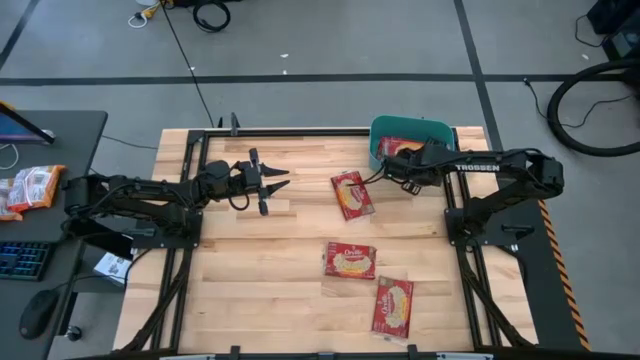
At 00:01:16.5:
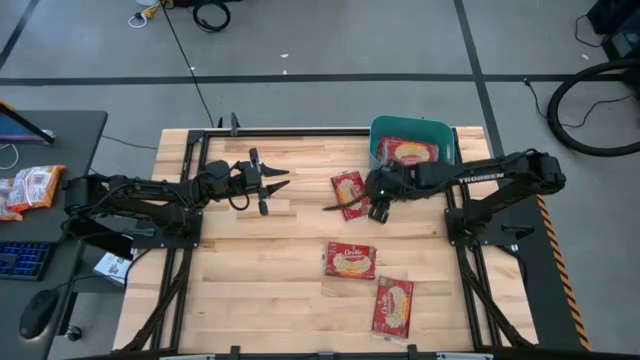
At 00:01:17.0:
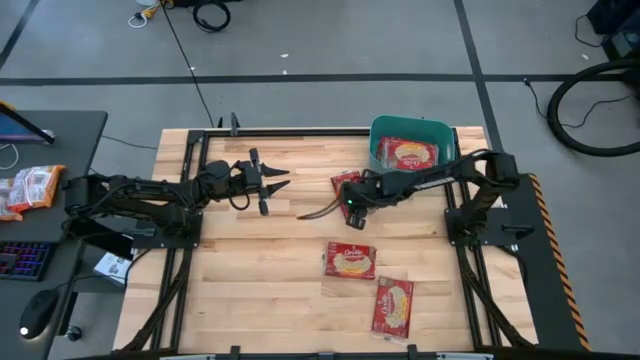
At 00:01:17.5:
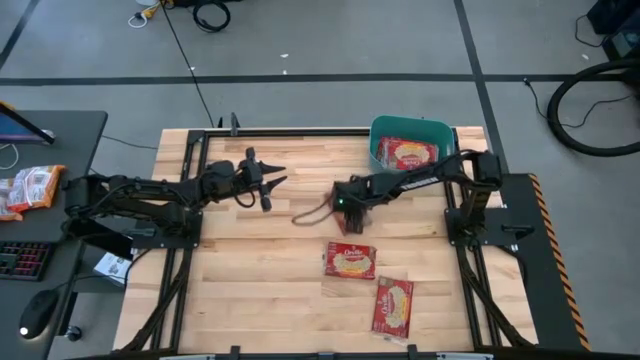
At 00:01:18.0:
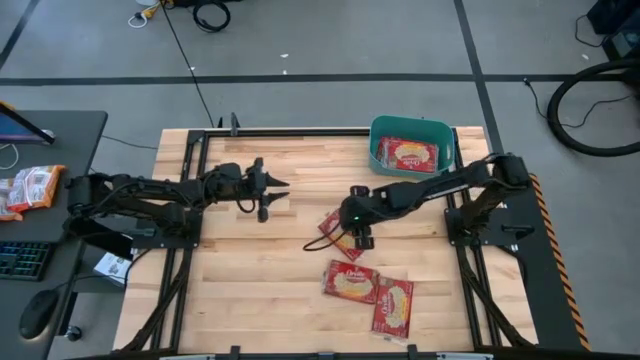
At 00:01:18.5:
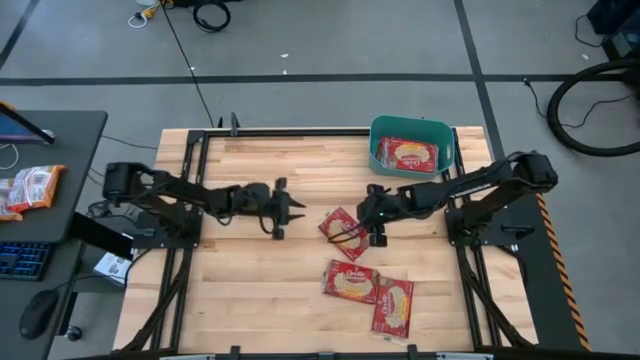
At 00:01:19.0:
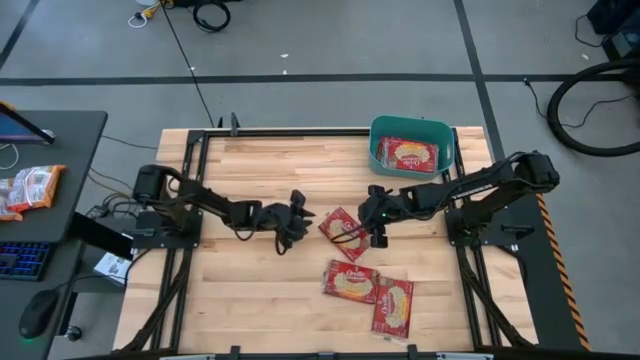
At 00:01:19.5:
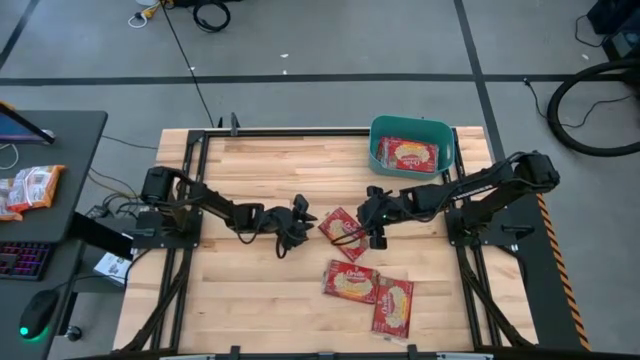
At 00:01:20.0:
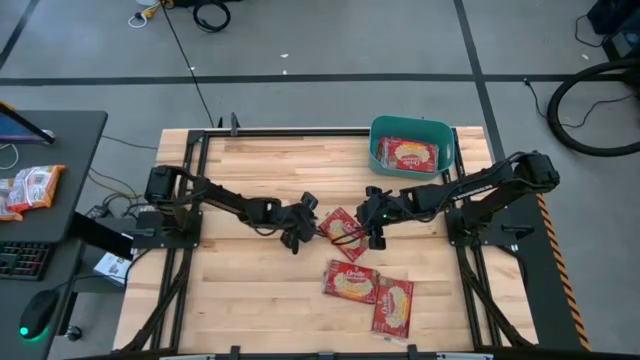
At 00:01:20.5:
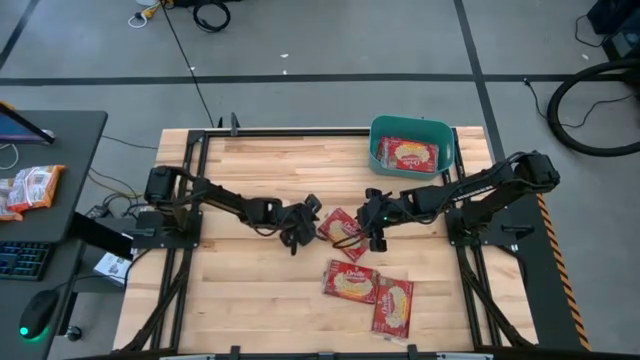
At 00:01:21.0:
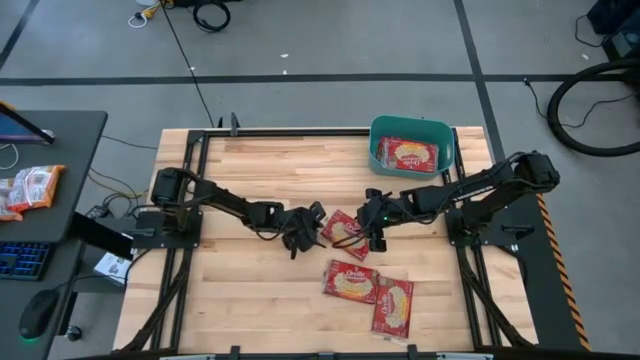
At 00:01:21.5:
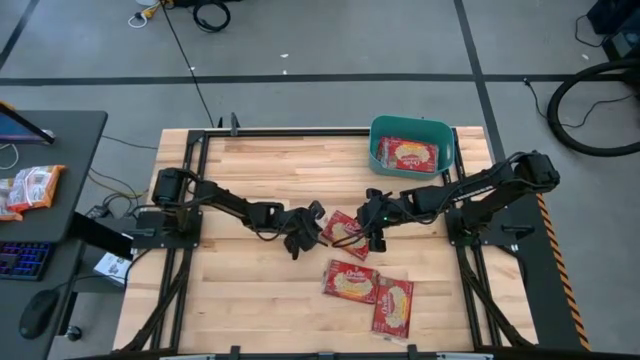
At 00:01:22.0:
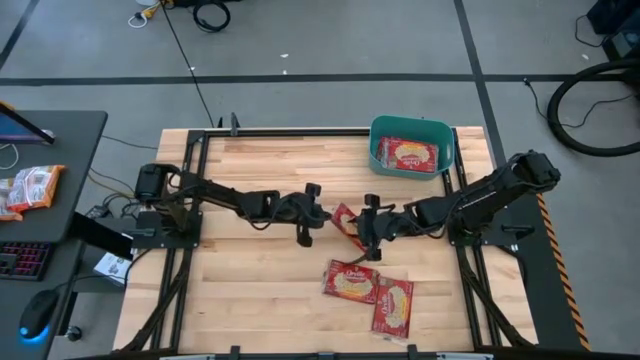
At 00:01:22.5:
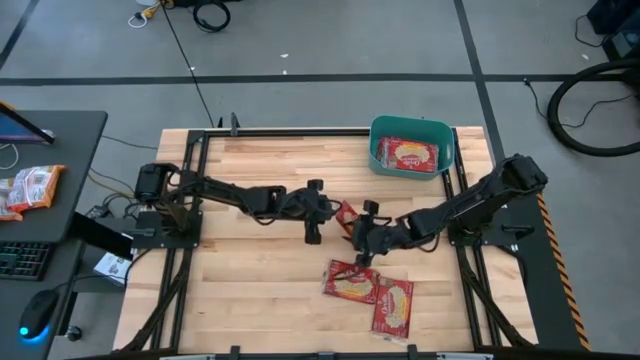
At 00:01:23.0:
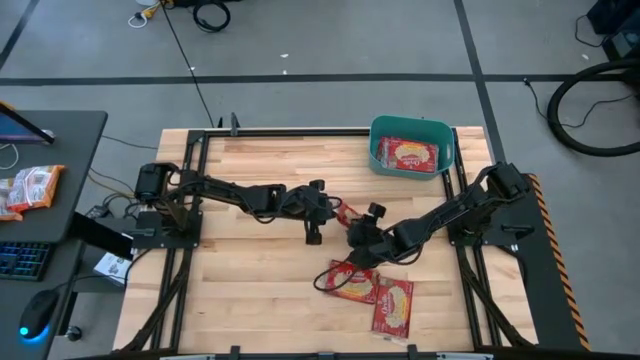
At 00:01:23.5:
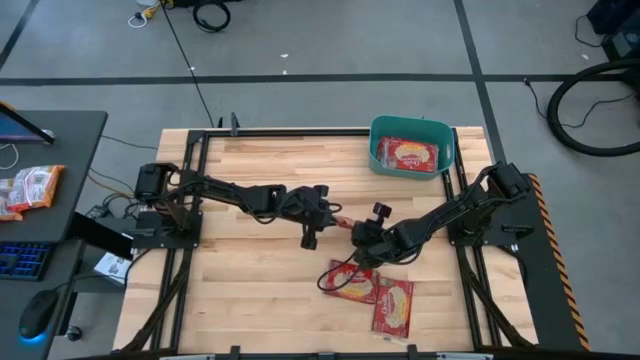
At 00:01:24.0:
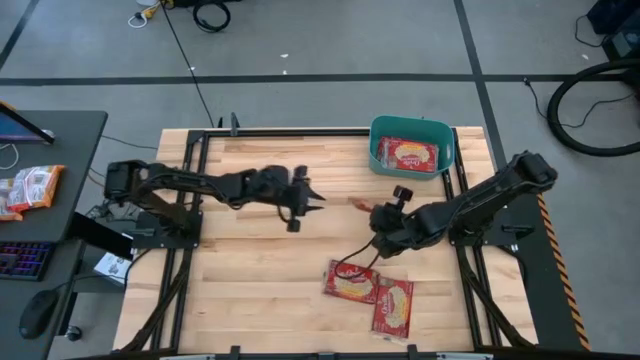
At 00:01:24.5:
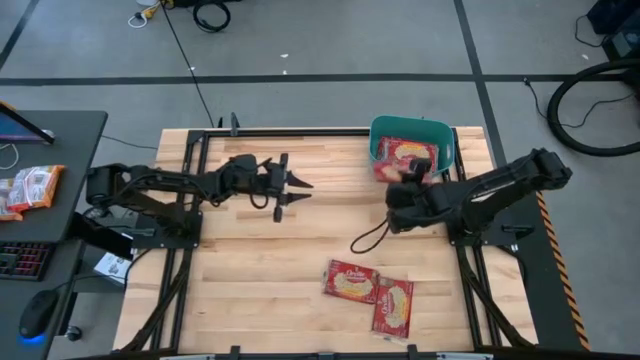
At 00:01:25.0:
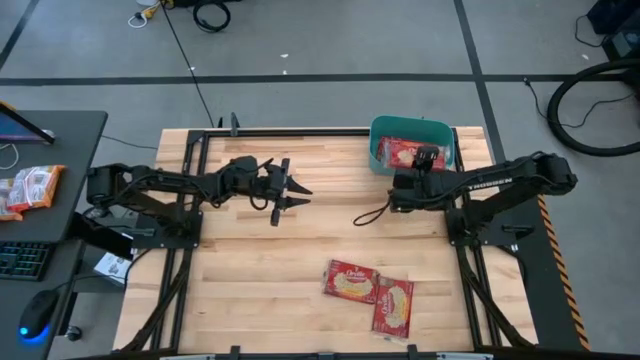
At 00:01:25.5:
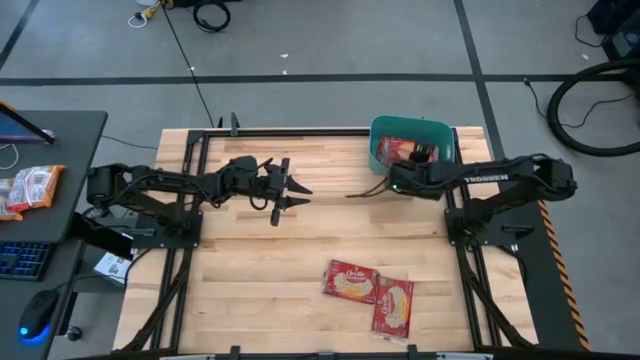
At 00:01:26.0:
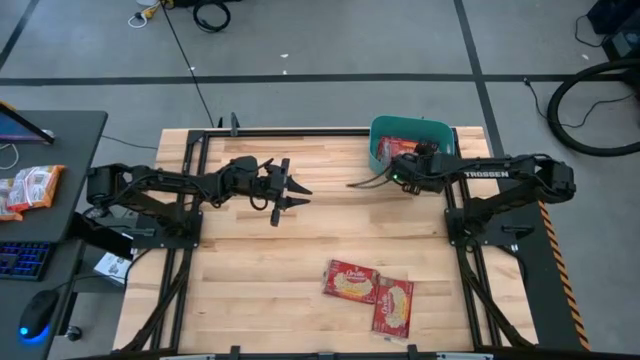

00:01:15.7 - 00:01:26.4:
Task: Sort popcorn bags into baskets
Put the popcorn bag into the blue bin

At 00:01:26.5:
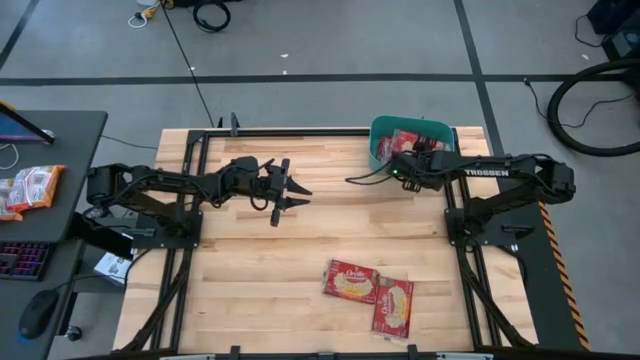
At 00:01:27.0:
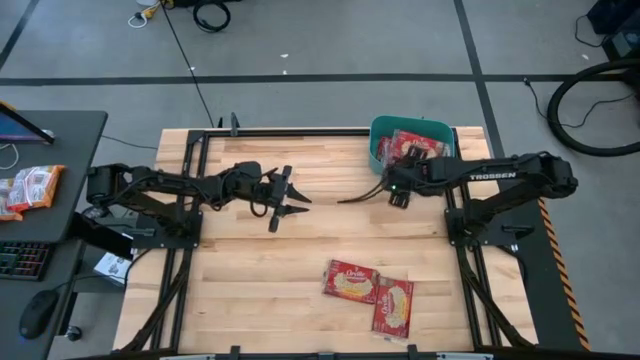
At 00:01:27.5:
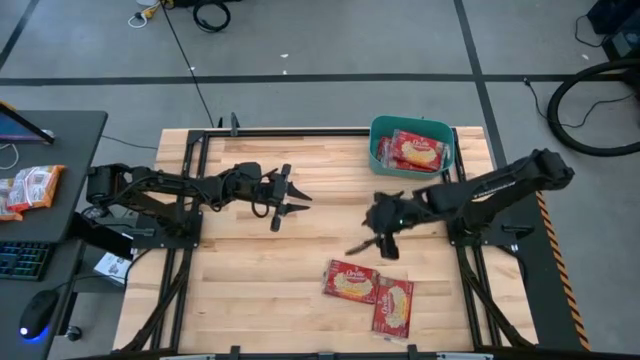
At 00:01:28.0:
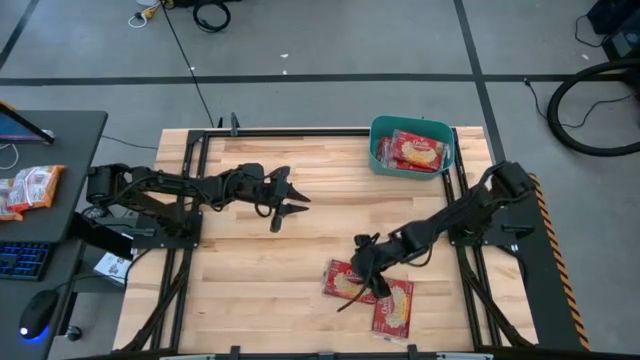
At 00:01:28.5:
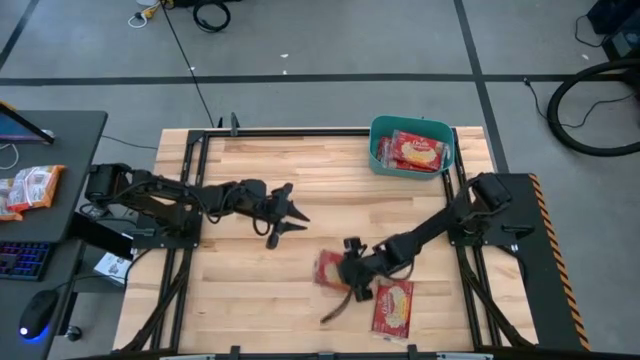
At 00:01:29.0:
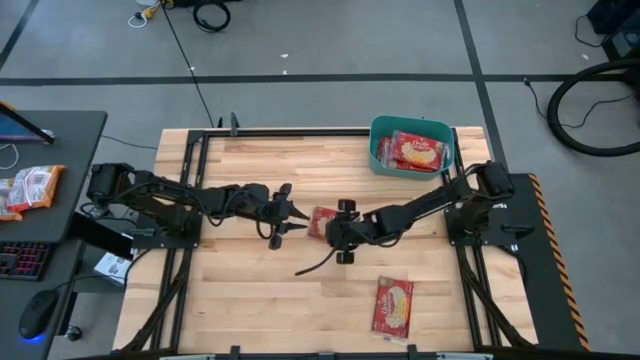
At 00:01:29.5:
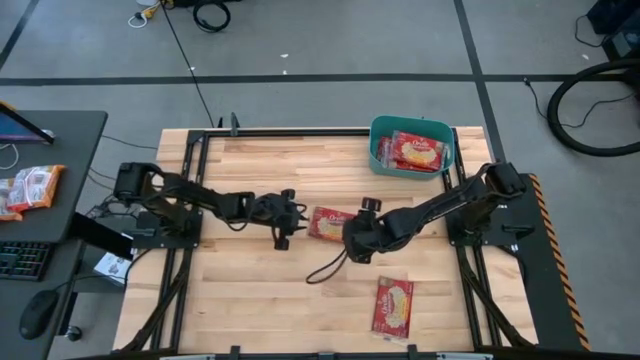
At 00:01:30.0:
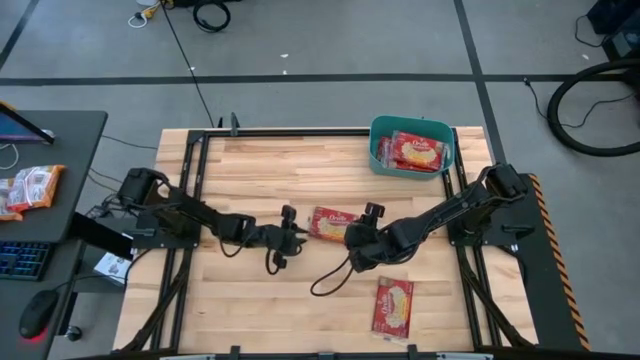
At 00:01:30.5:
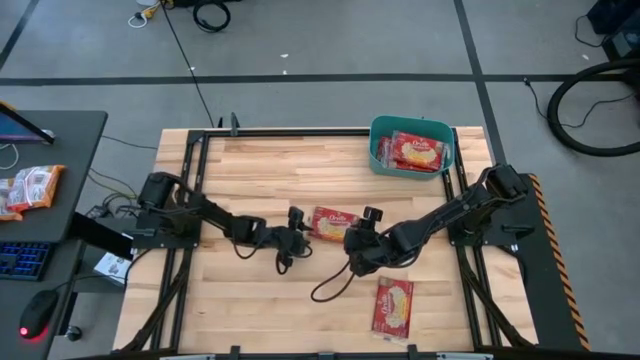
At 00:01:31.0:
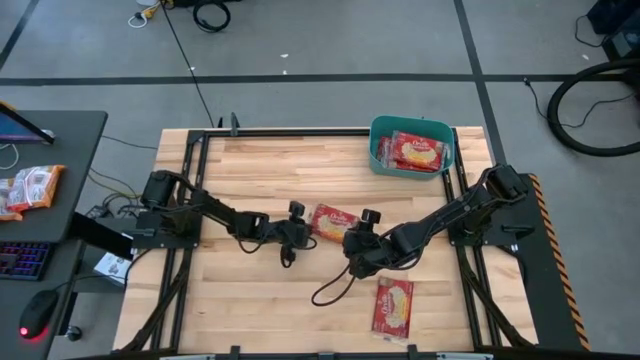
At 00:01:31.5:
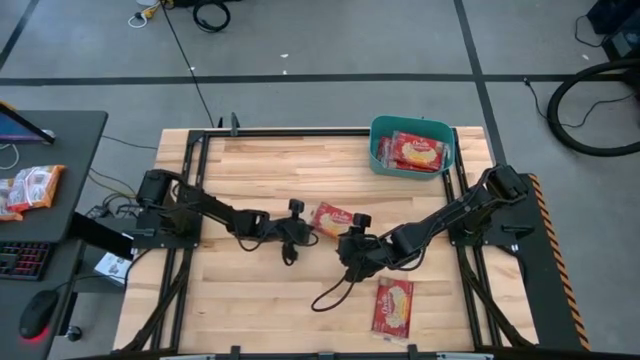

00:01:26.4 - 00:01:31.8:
Put the popcorn bag into the blue bin

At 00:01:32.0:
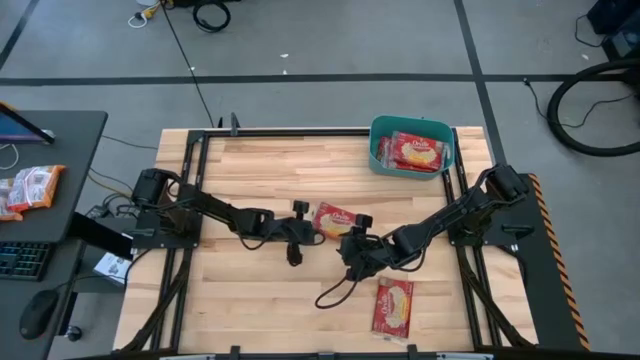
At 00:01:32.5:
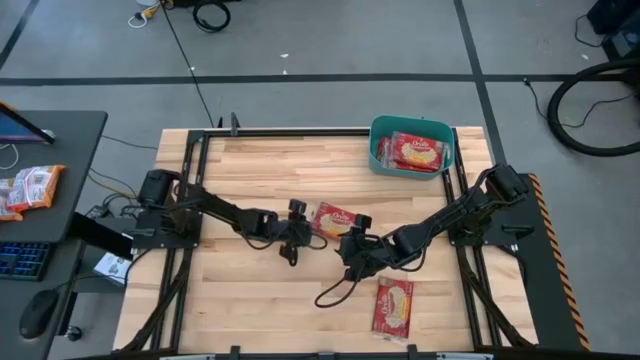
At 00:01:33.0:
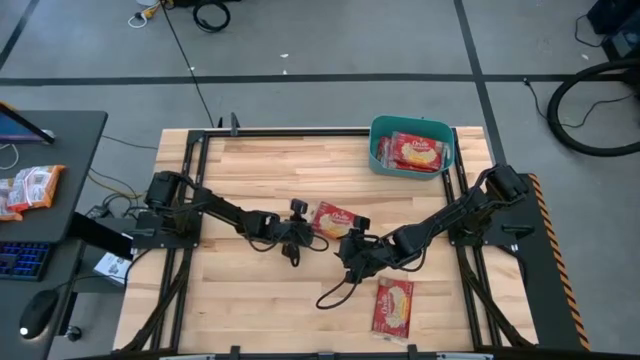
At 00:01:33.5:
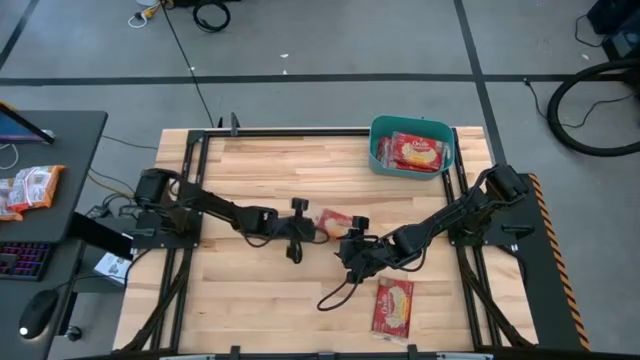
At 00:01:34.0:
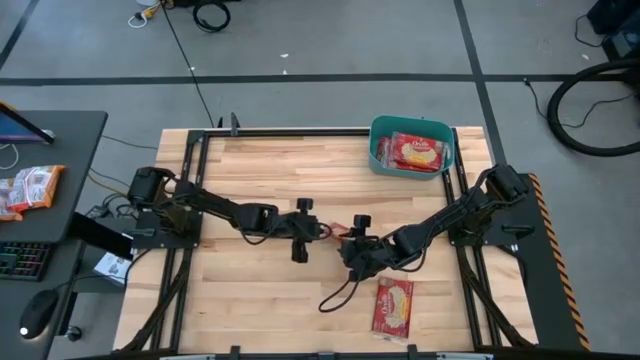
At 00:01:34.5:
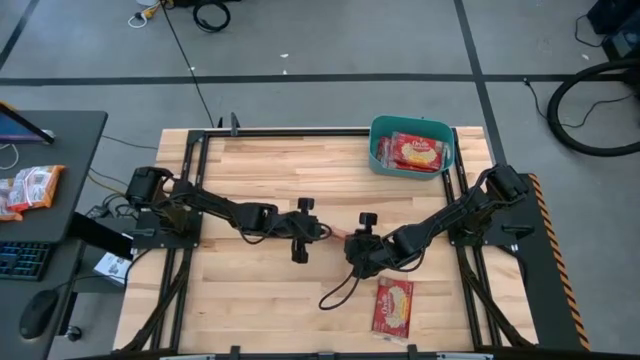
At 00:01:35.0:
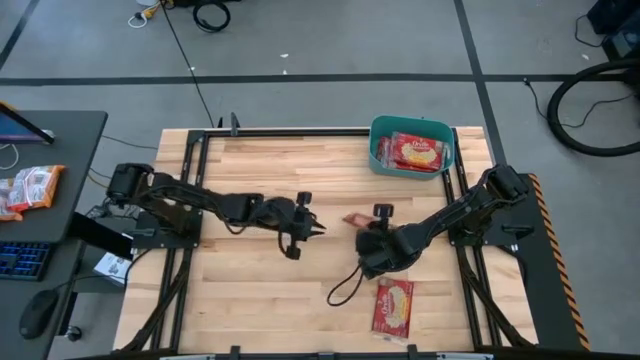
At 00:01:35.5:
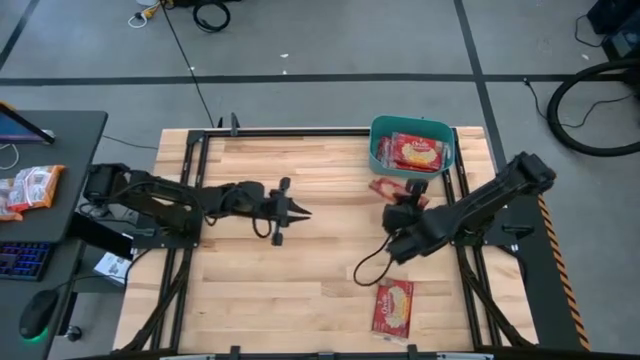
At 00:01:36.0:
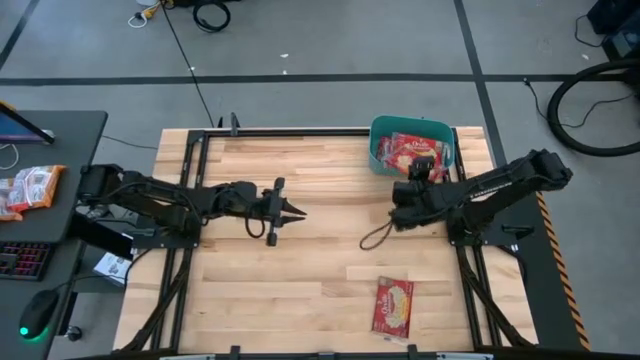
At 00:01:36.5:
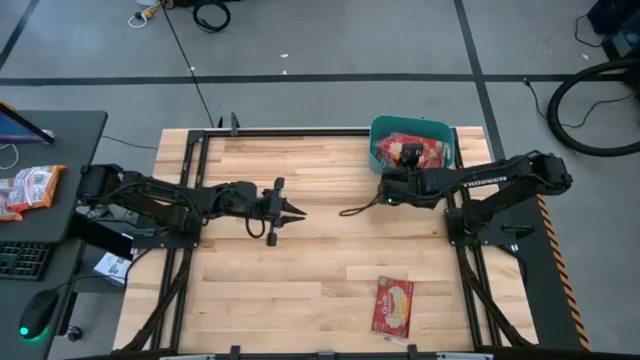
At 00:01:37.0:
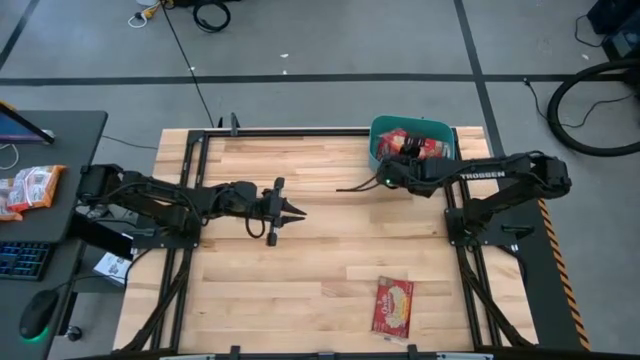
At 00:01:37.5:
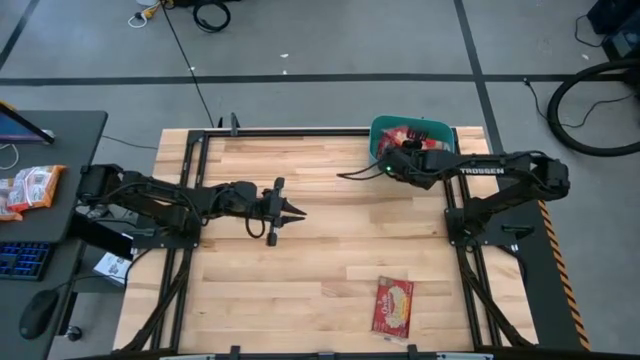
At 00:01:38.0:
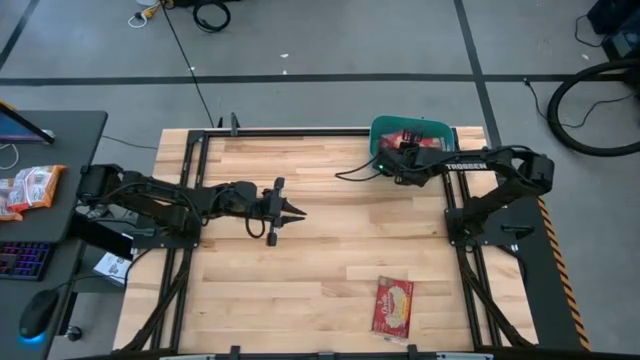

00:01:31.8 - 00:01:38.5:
Put the popcorn bag into the blue bin
